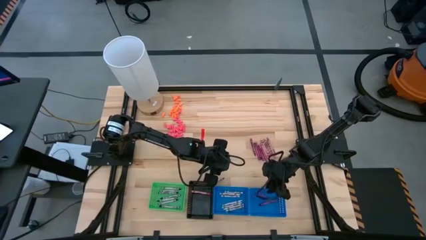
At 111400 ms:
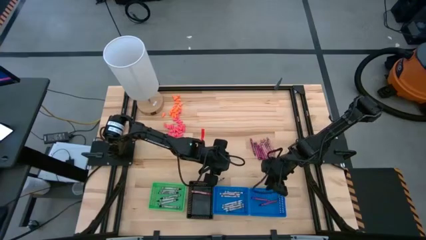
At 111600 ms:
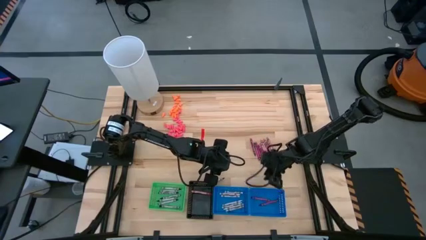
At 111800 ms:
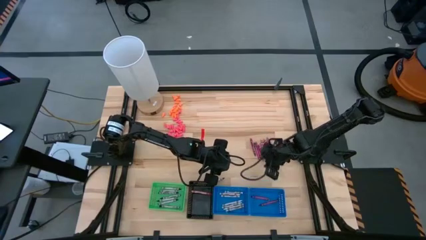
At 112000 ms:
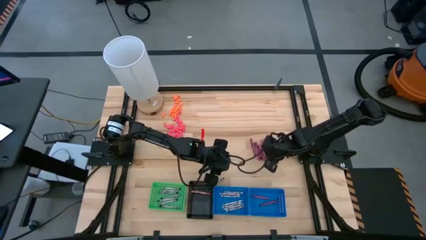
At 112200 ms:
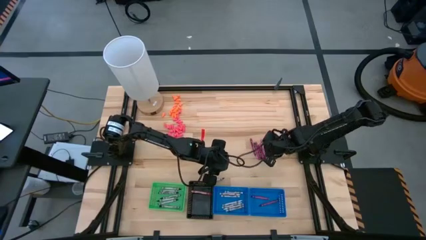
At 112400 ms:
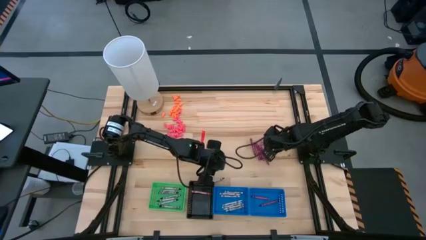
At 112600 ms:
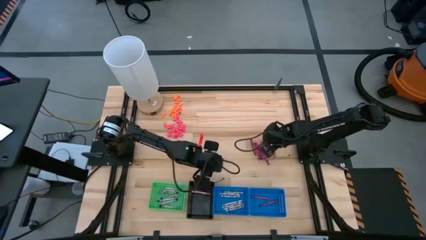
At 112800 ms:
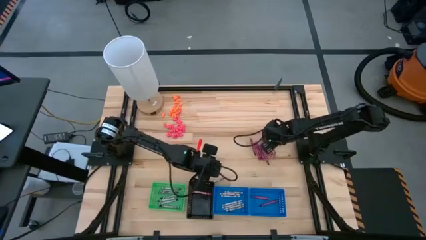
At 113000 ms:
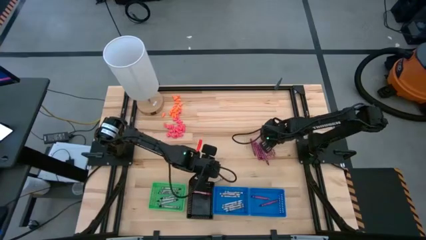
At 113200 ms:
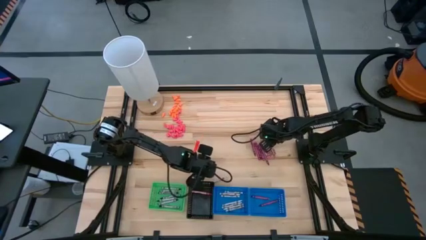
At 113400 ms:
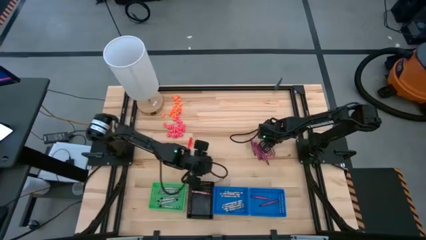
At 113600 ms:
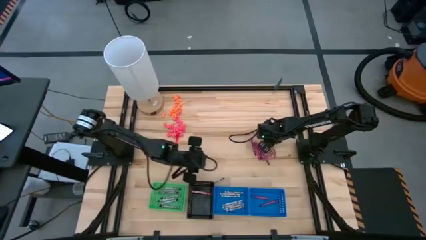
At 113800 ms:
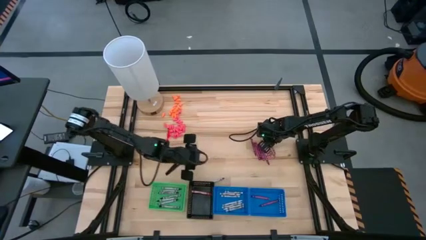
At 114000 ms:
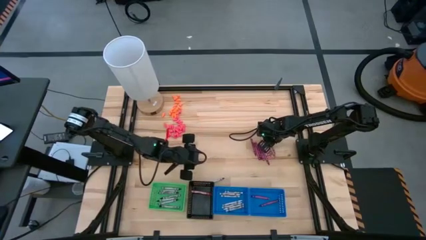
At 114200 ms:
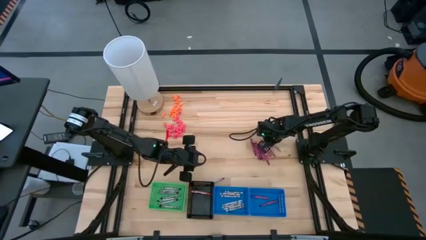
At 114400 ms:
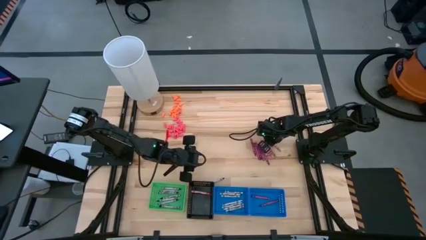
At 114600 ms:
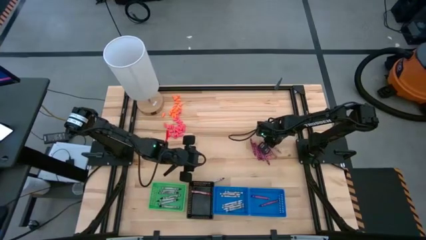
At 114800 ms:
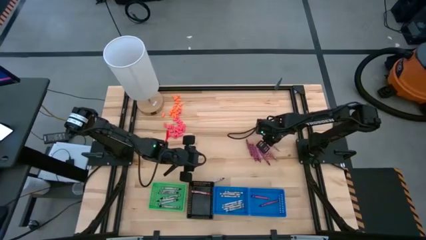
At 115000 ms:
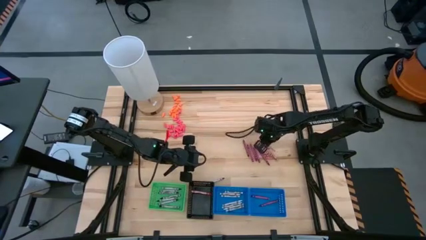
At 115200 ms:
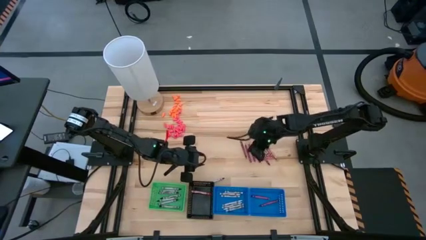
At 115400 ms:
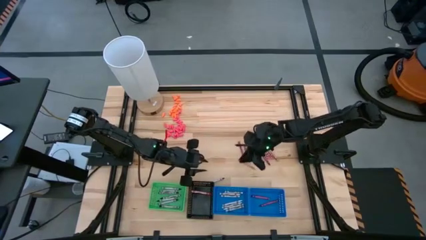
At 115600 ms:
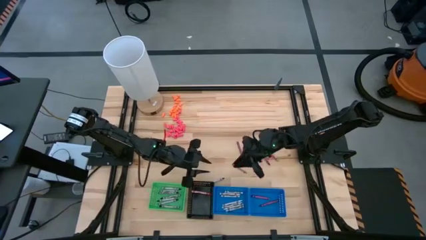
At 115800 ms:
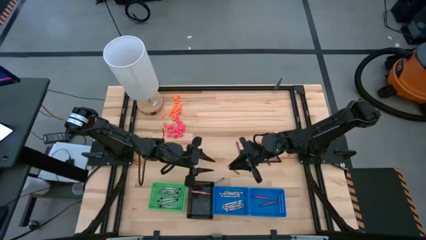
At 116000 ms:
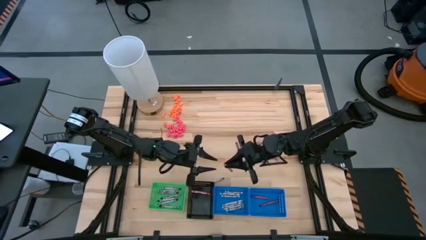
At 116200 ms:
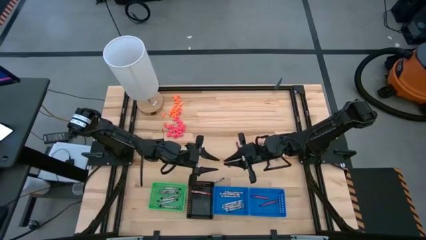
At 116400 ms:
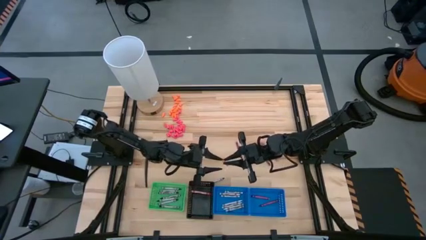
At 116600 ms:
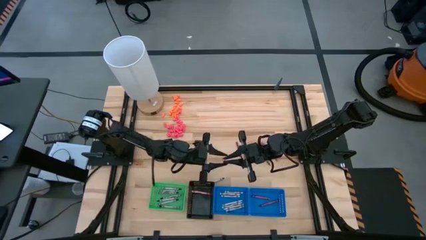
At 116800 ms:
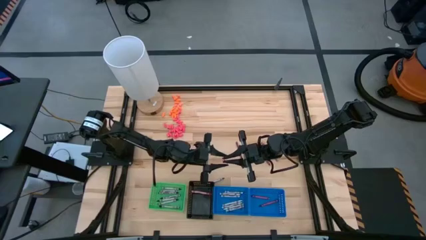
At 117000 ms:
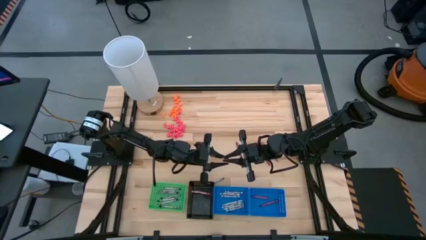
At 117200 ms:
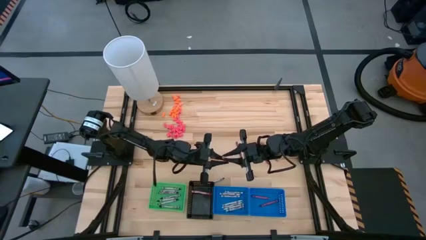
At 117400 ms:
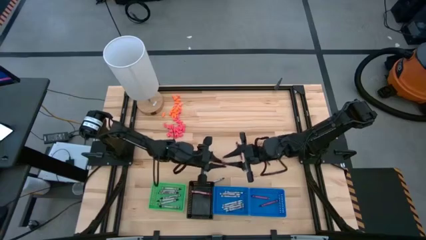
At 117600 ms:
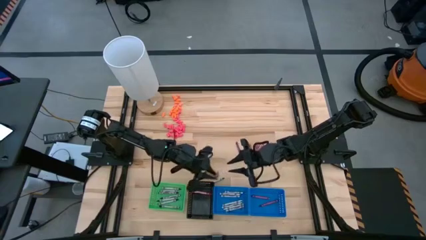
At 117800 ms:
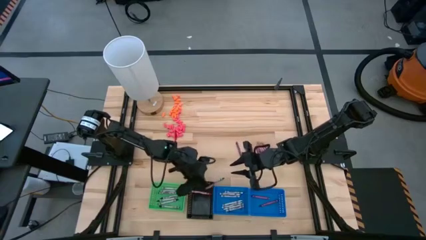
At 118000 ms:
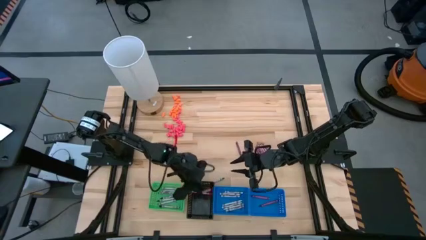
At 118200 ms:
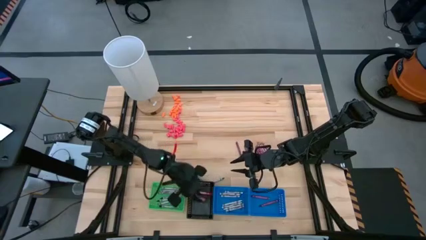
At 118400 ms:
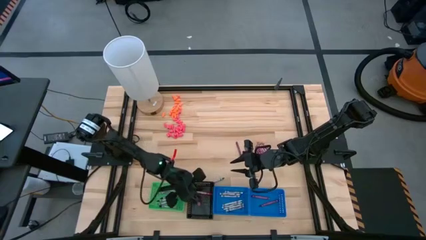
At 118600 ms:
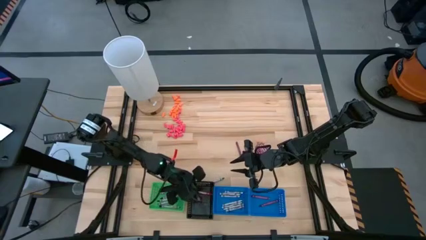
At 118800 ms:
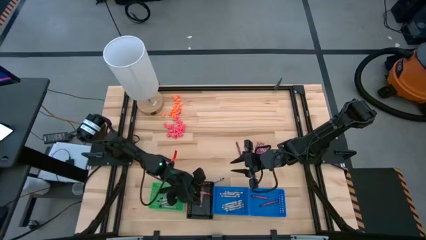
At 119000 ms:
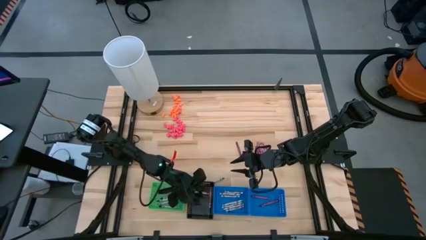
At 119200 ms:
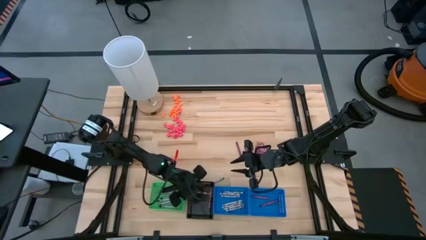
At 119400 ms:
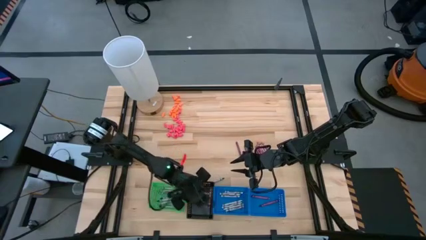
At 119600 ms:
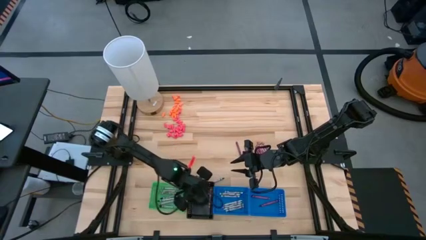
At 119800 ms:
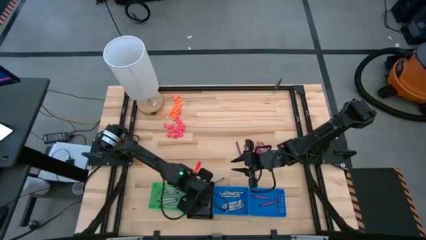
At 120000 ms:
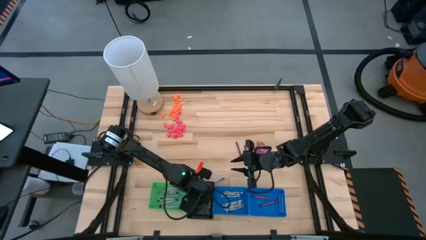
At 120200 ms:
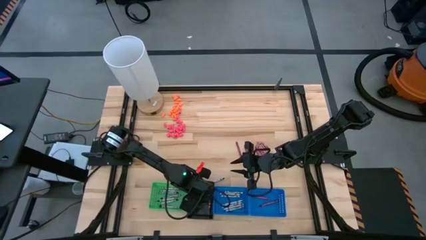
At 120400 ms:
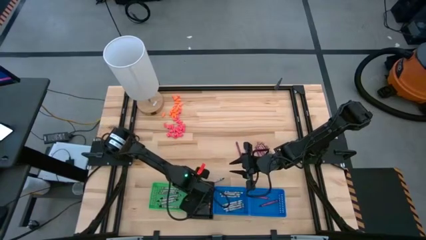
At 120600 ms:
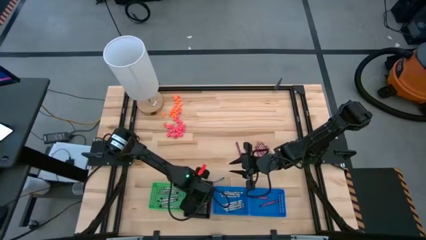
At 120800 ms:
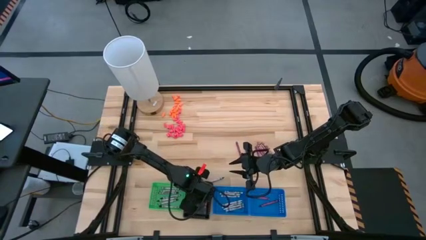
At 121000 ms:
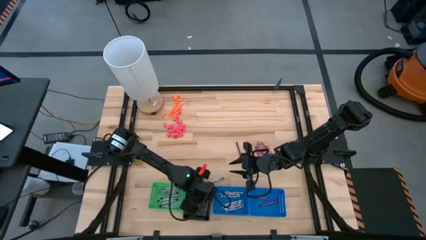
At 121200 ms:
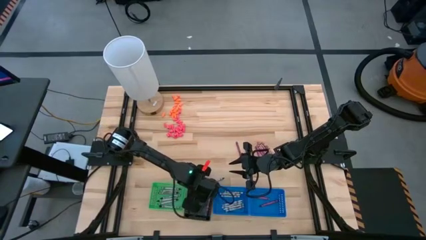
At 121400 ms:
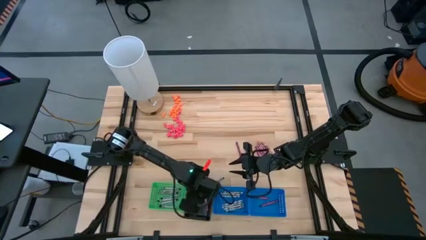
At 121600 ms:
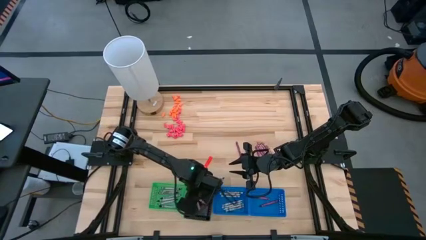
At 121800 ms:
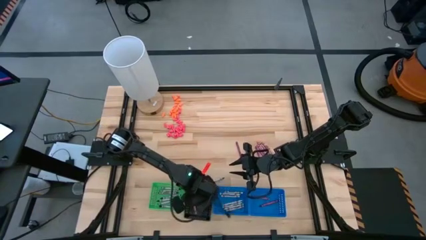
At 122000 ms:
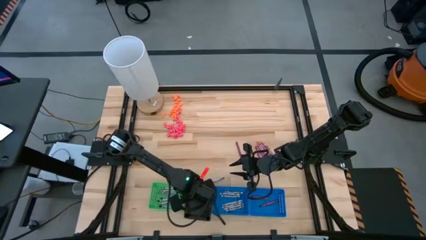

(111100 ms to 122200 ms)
Task: Sort crayons
Put the pink crayon into the black bin

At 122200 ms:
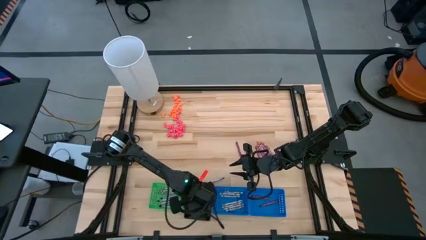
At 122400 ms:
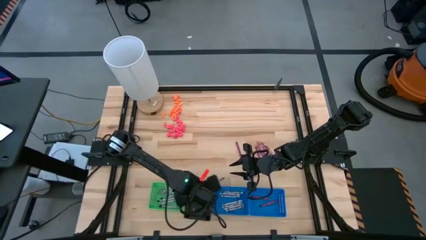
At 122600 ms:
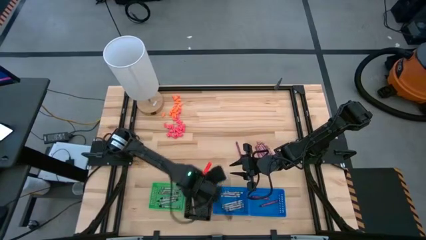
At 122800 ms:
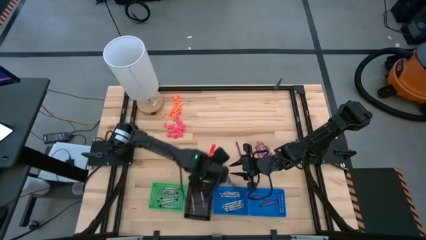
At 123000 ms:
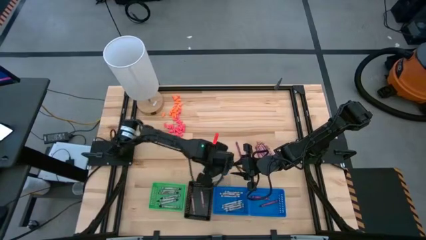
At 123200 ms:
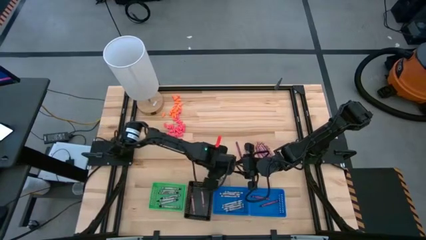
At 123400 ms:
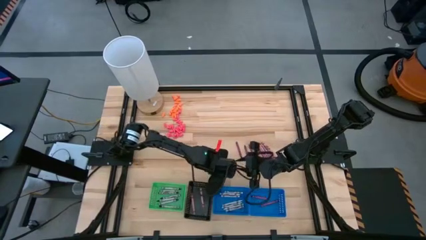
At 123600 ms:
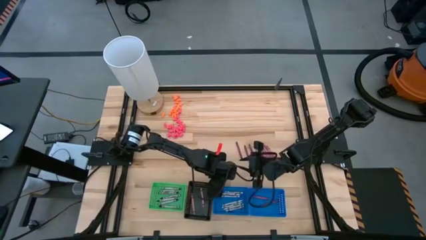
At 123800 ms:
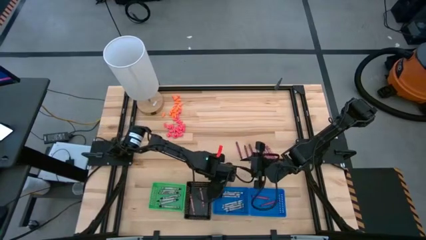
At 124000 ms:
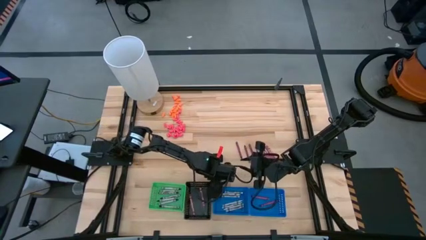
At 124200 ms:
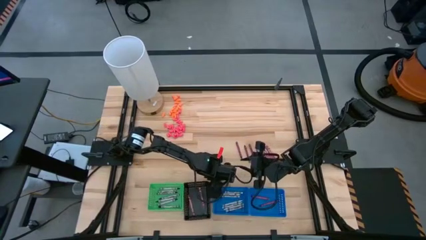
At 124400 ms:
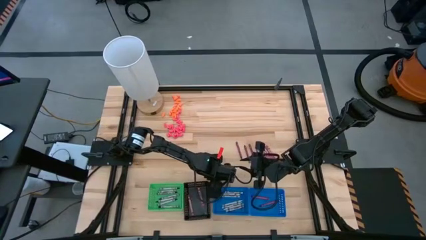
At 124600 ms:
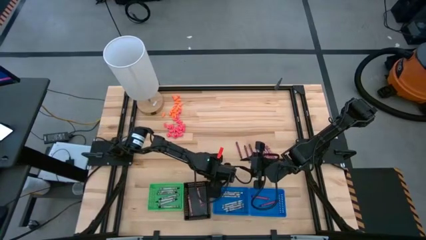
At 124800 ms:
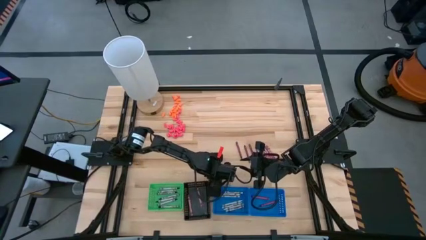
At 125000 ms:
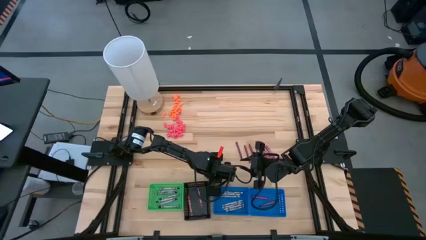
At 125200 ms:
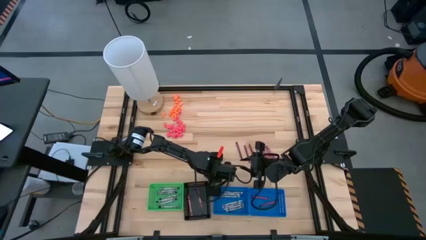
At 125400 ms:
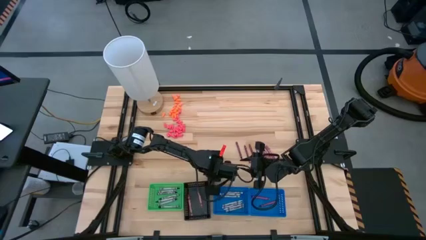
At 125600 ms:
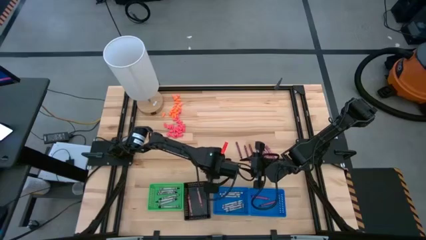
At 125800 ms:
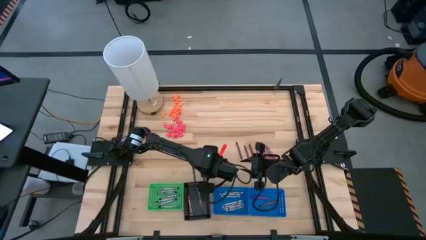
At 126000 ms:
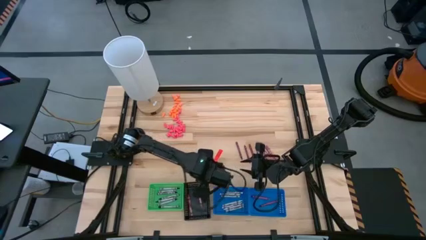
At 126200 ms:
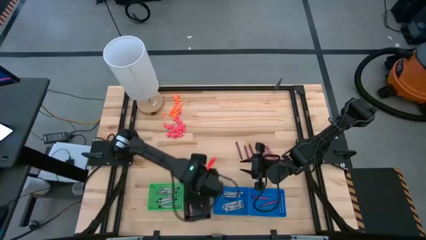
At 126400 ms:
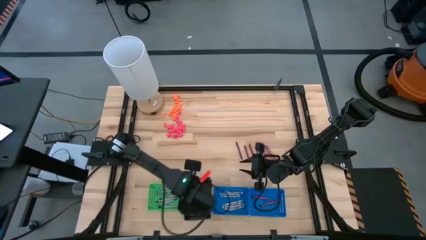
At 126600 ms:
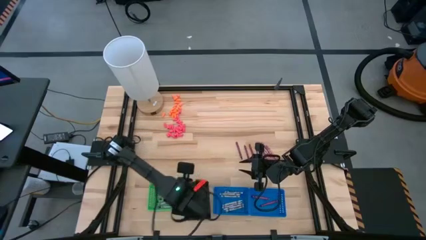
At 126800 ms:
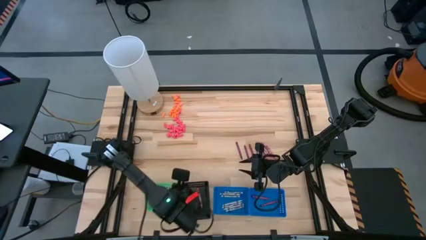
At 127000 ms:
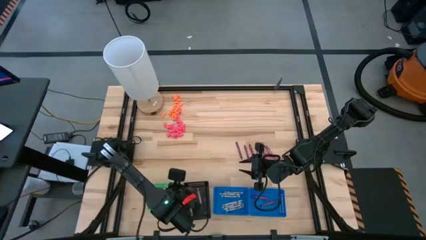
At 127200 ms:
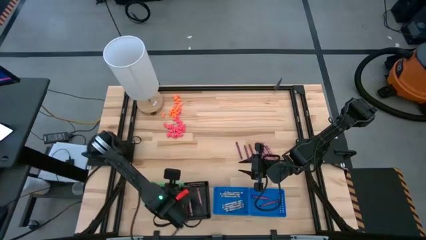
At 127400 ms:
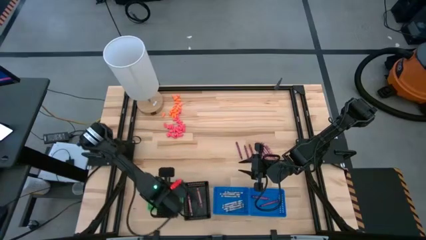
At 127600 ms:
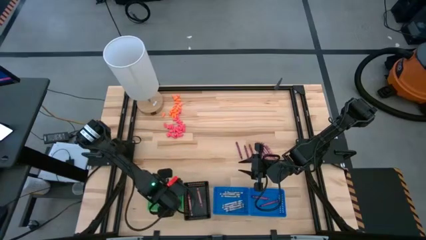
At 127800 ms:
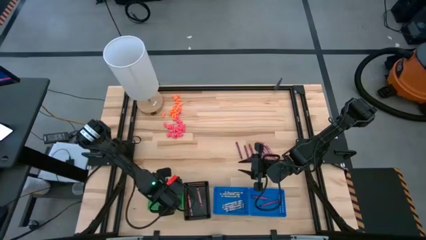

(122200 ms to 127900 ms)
Put the black crayon into the green bin
